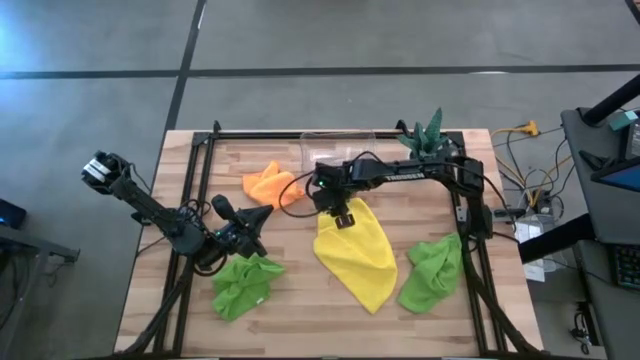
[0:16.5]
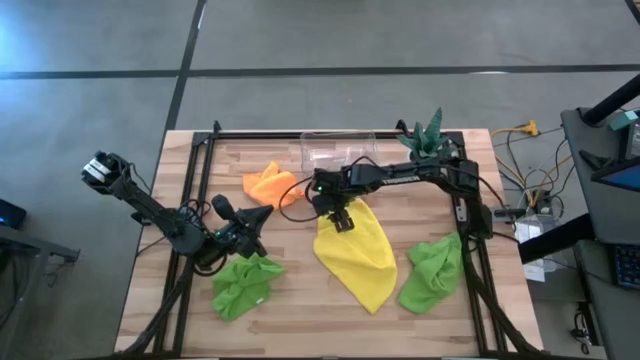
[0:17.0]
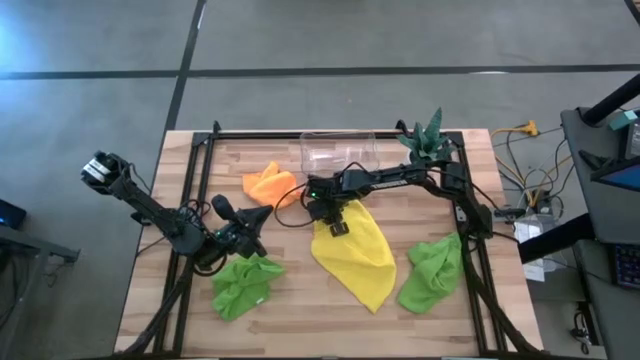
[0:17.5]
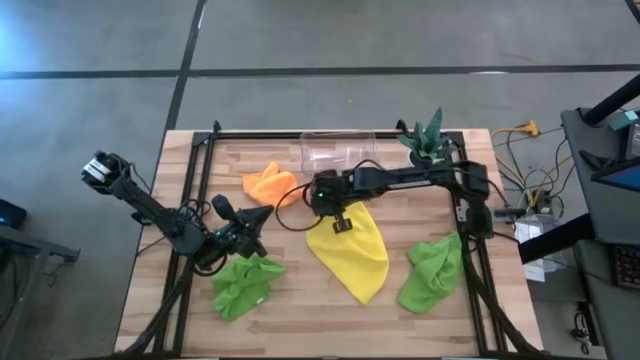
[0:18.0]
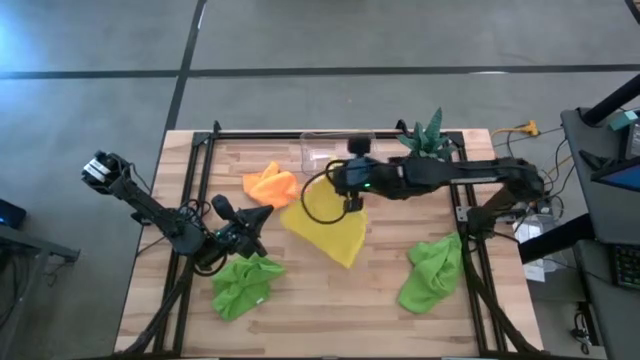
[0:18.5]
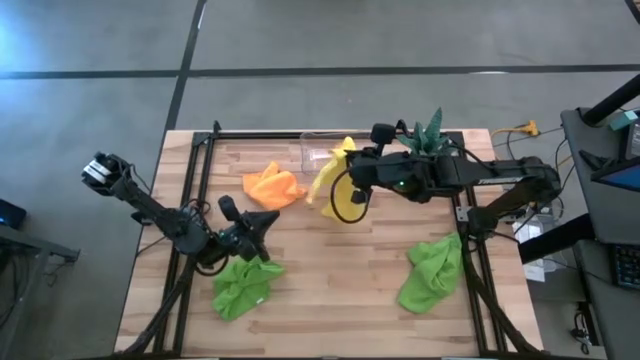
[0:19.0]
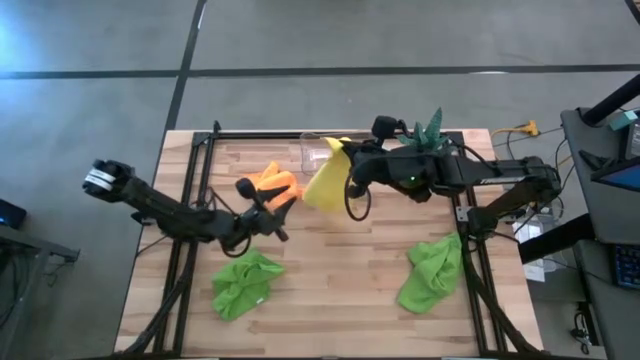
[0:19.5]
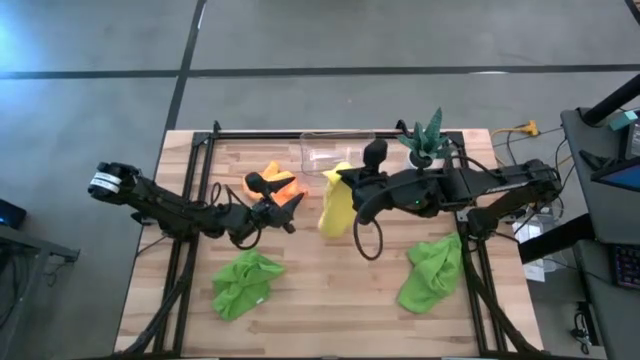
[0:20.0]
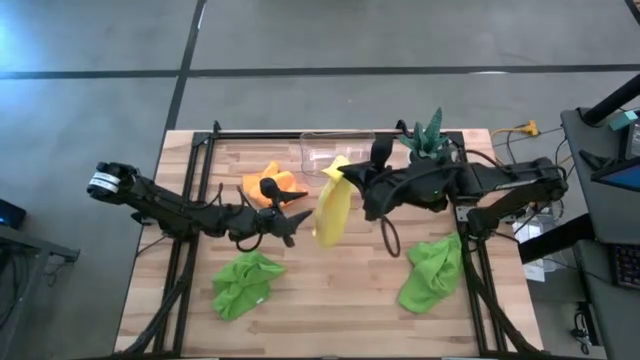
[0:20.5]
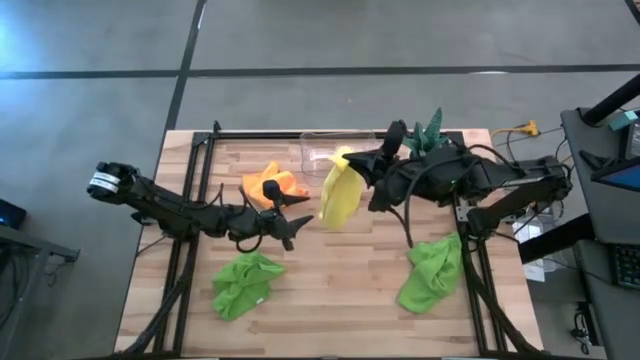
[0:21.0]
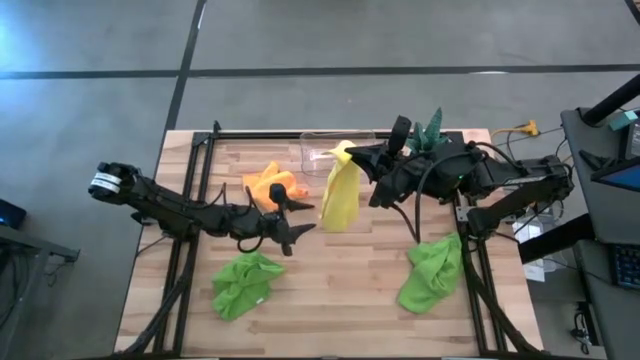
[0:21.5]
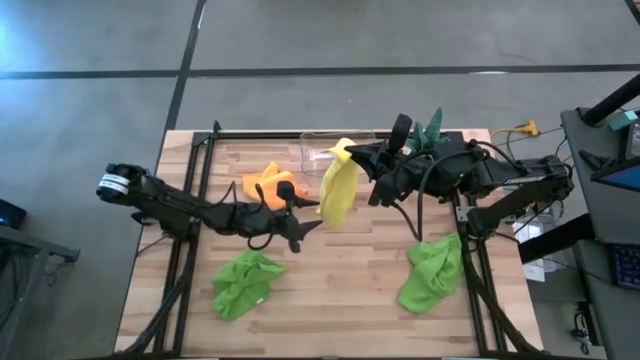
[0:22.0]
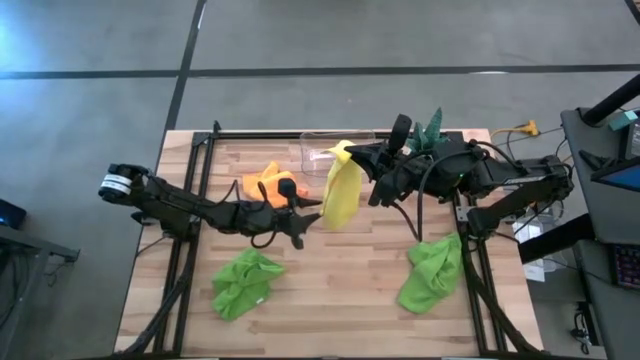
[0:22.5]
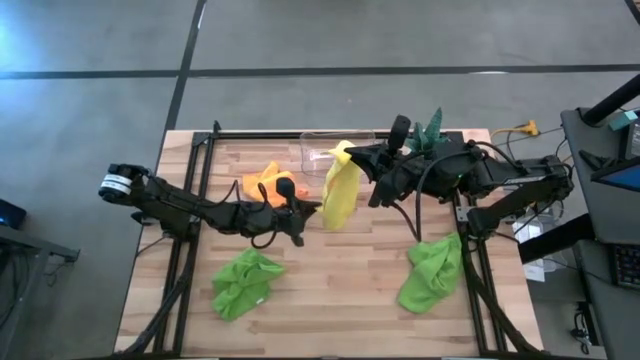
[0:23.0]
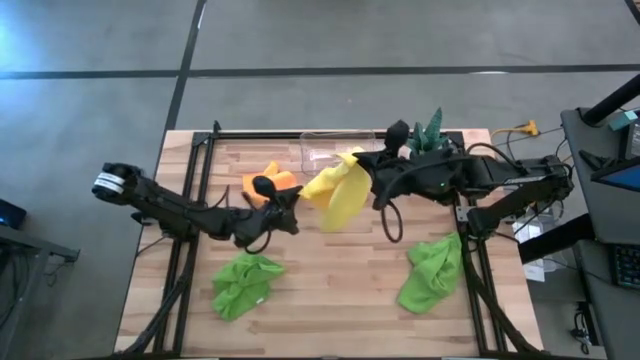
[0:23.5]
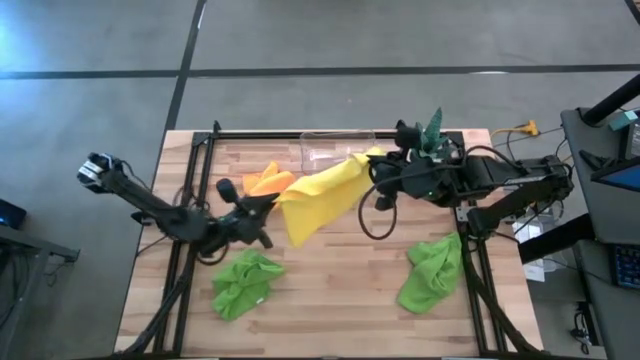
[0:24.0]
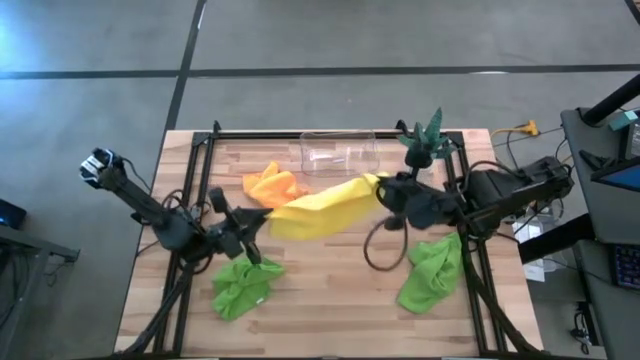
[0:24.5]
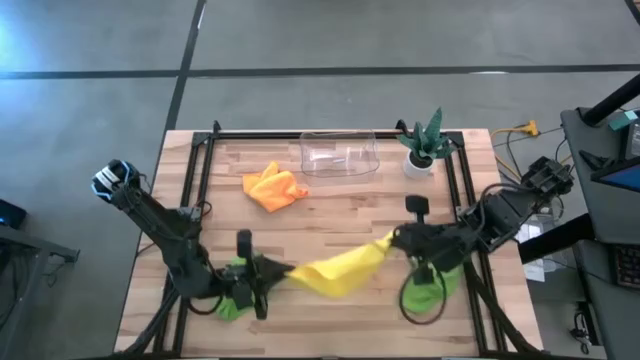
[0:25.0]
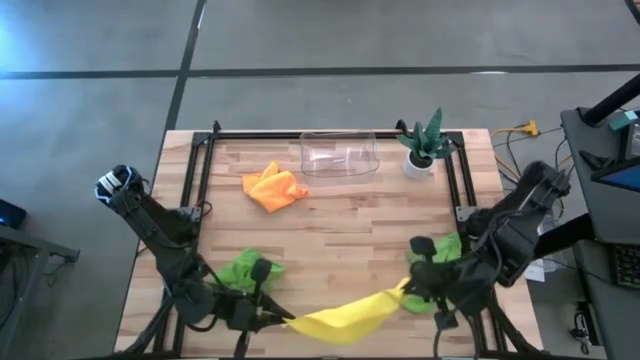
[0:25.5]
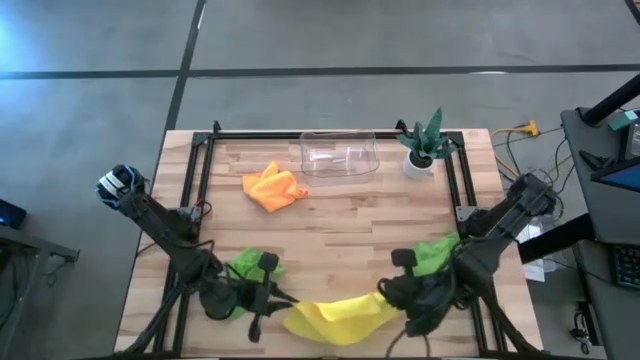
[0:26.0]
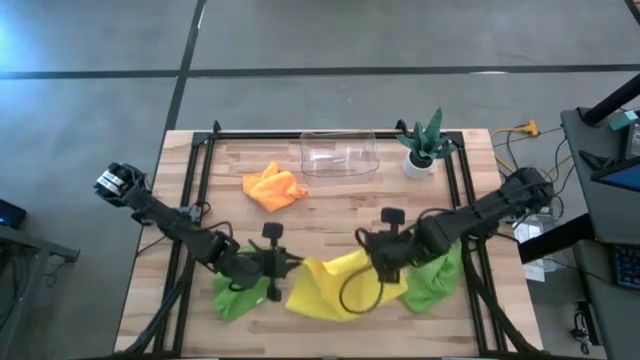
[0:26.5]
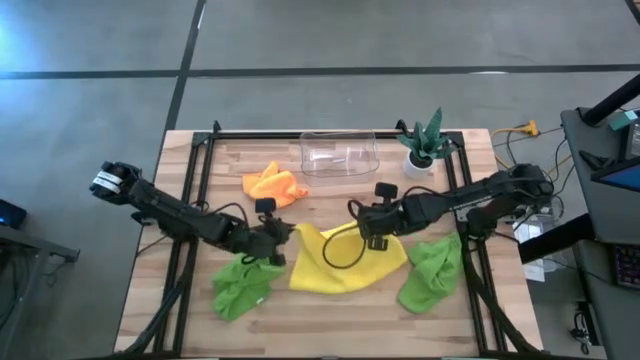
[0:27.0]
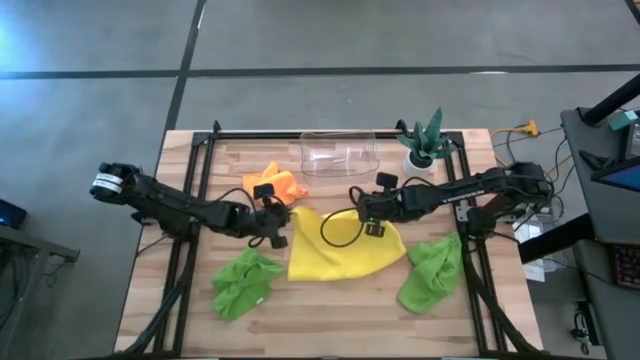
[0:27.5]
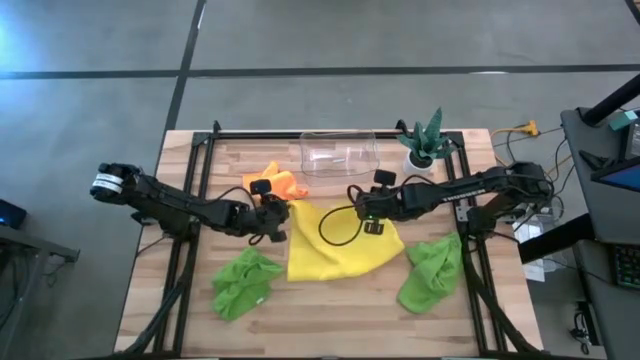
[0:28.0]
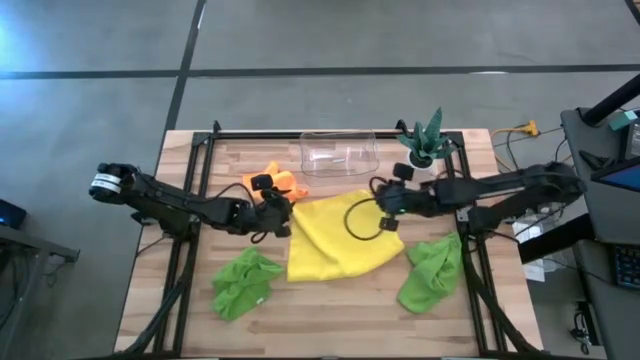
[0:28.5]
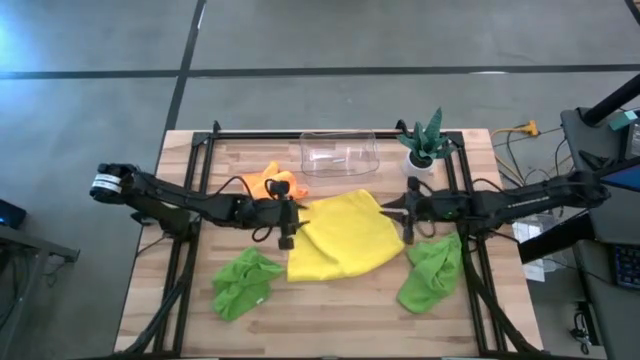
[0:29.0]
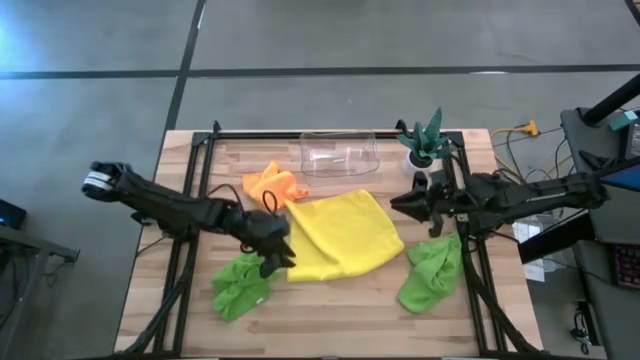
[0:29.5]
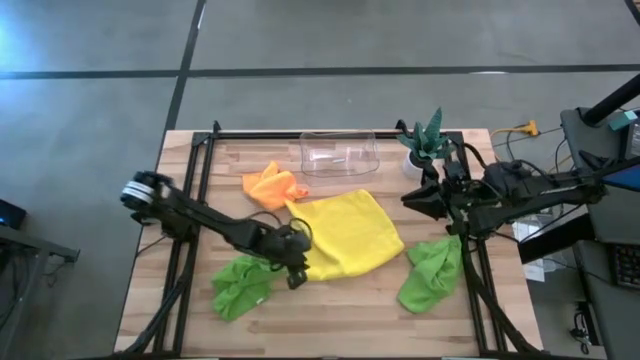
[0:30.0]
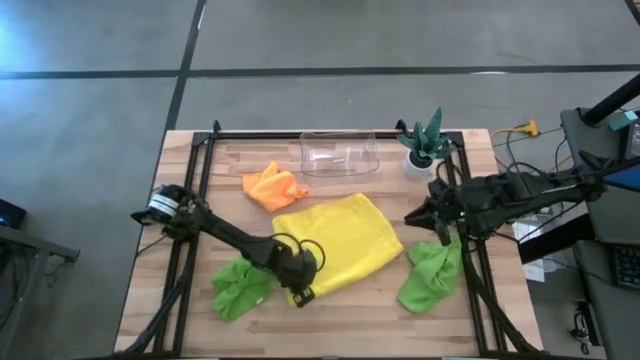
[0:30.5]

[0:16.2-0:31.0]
Task: Fold microfiber towels
Fold the yellow microfiber towel

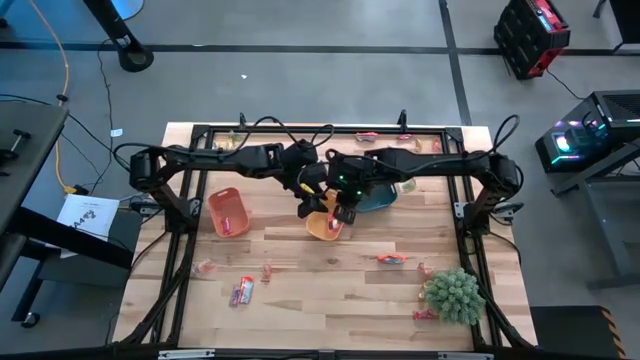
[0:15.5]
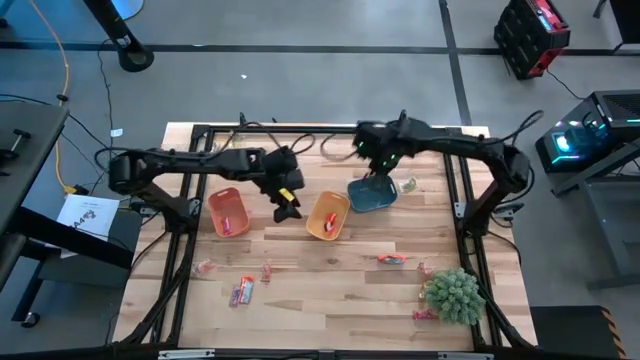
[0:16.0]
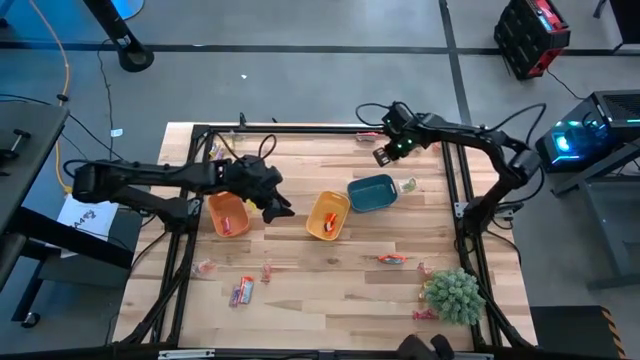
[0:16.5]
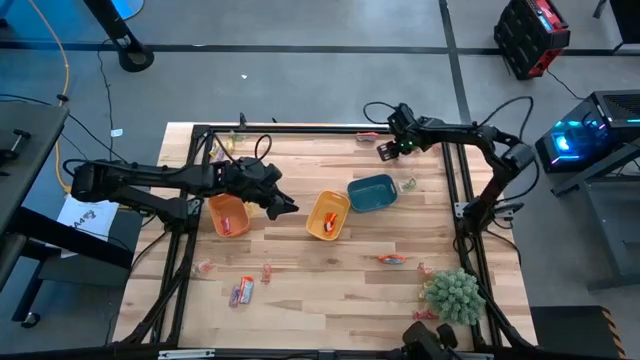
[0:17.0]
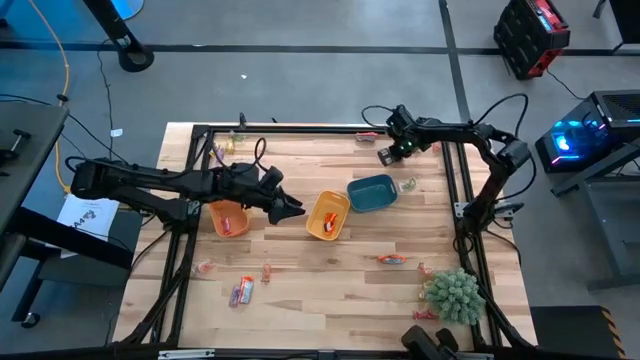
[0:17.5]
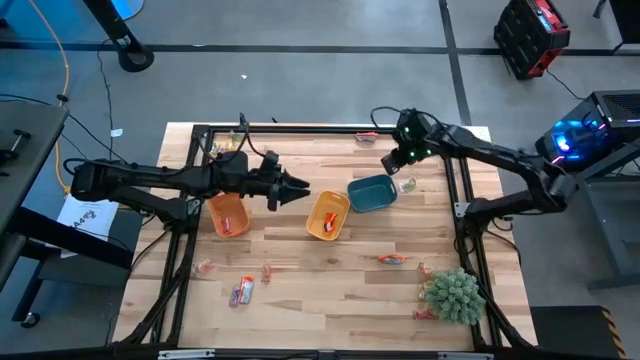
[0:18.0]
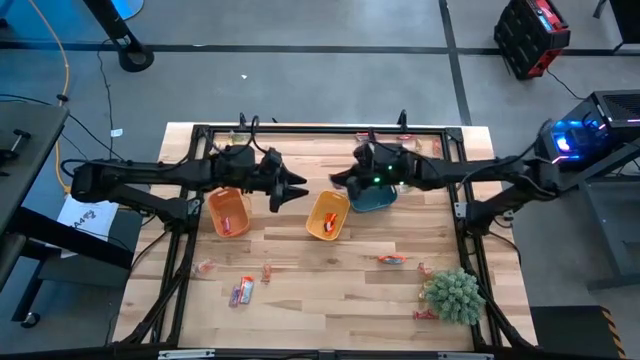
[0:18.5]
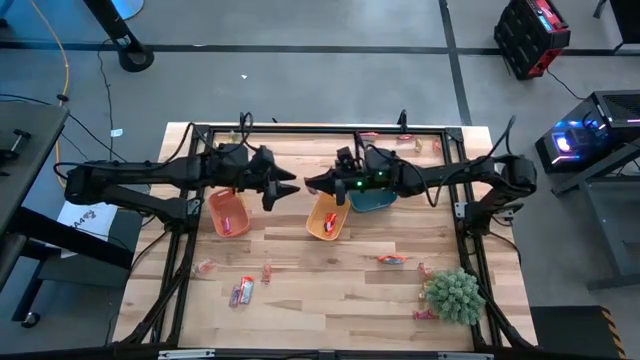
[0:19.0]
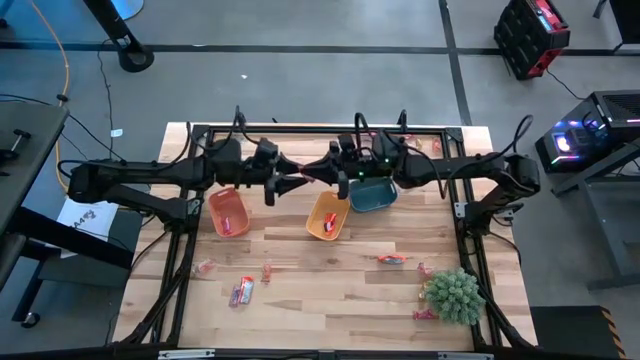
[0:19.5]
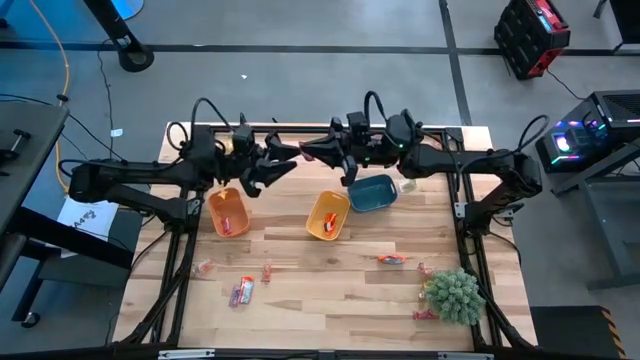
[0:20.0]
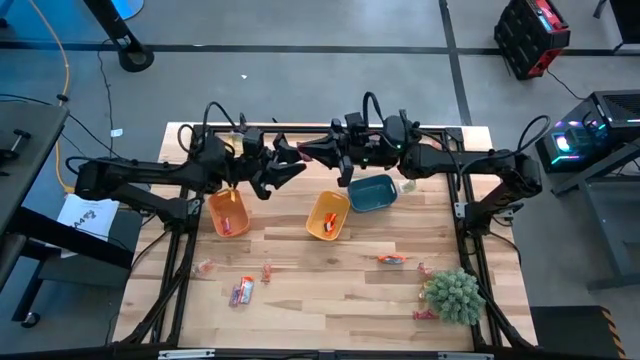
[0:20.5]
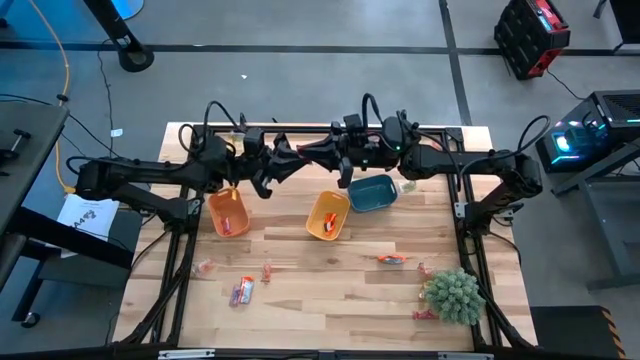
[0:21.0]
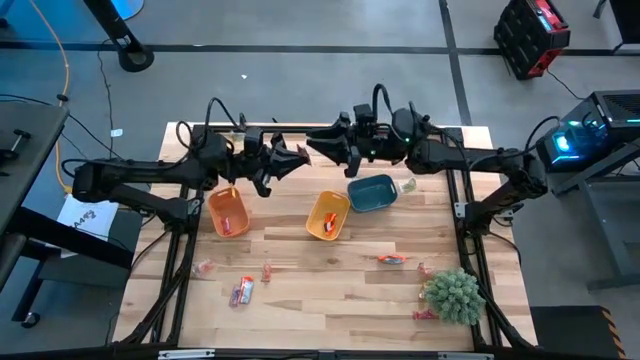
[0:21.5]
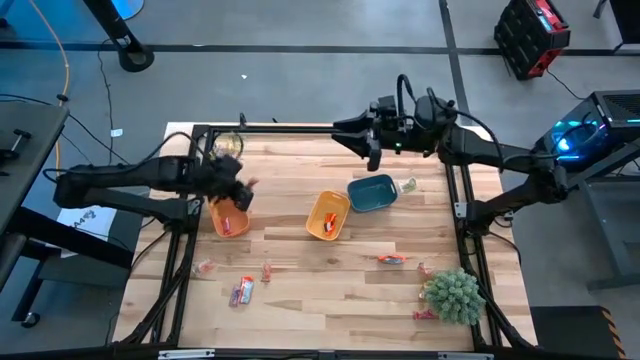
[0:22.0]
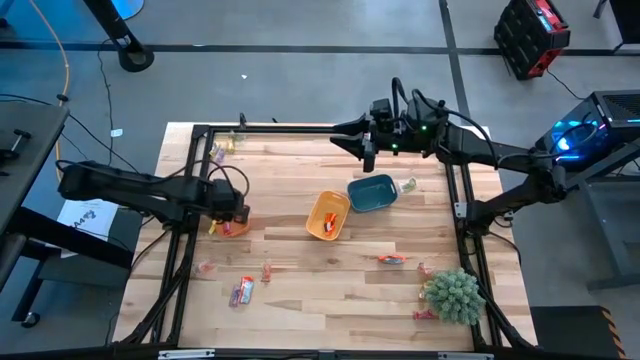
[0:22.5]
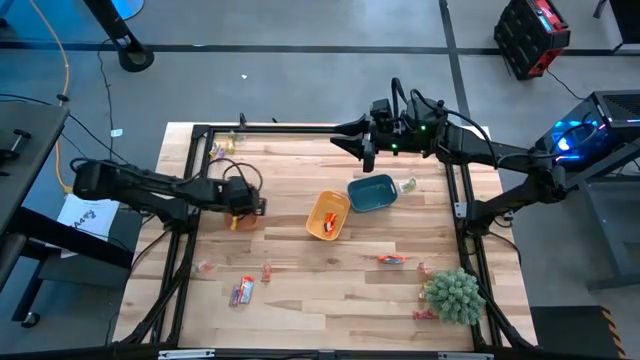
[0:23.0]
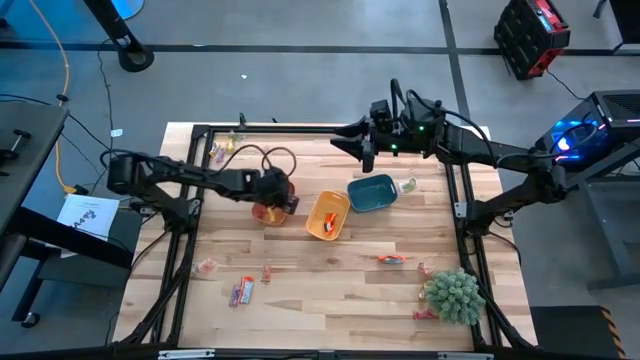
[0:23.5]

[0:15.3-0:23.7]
Task: Sort candy
Put the red candy into the orange bin
